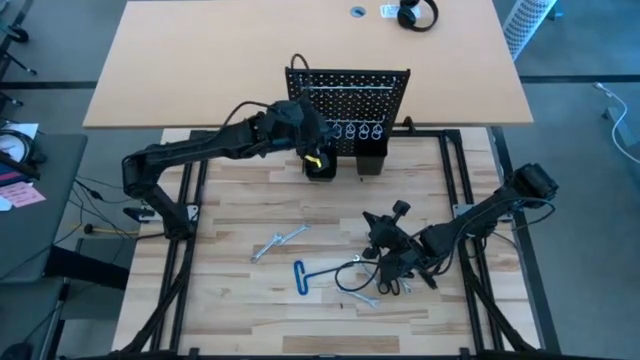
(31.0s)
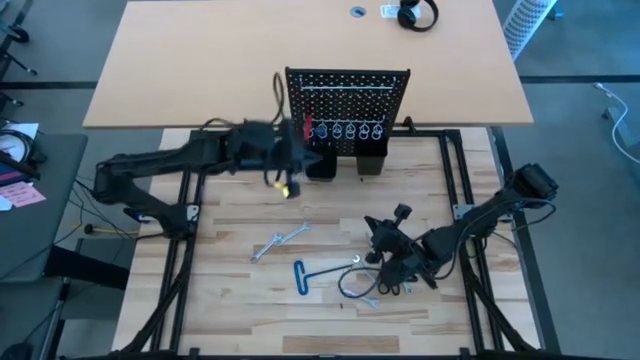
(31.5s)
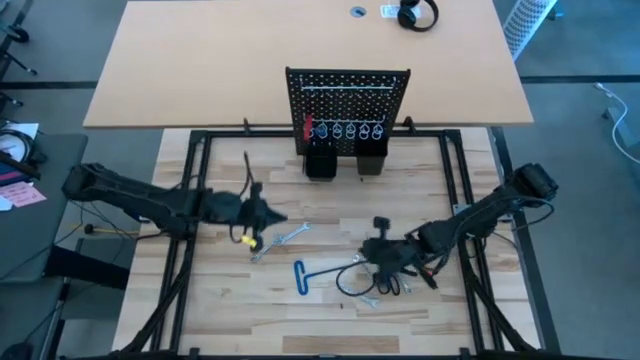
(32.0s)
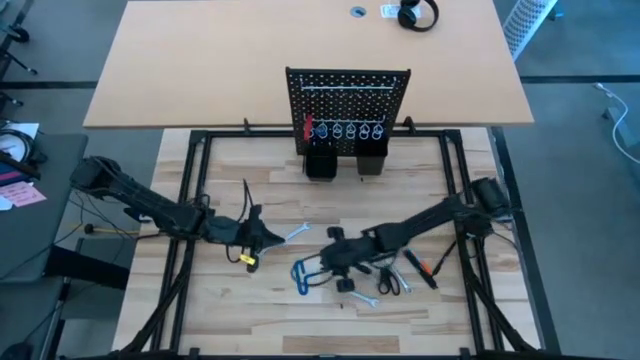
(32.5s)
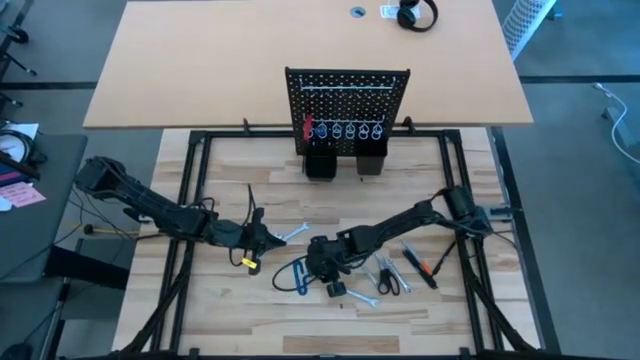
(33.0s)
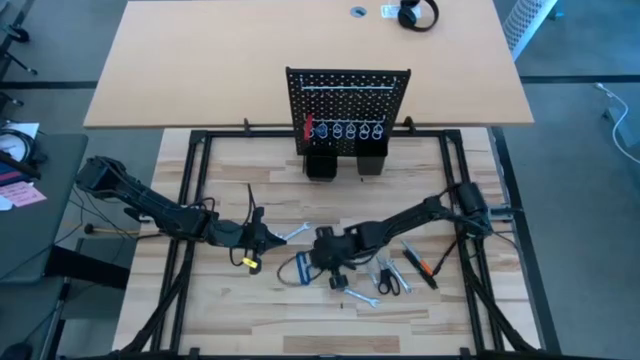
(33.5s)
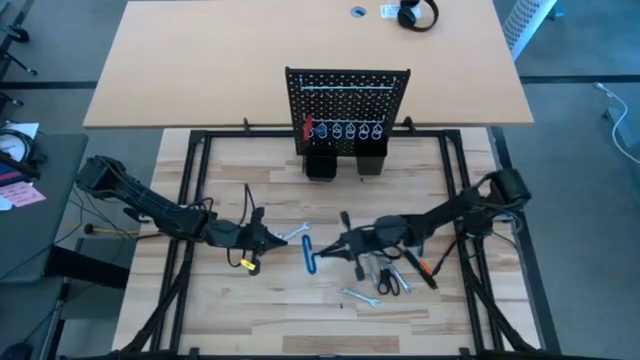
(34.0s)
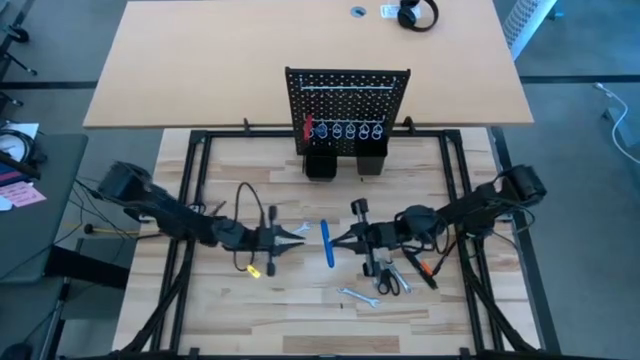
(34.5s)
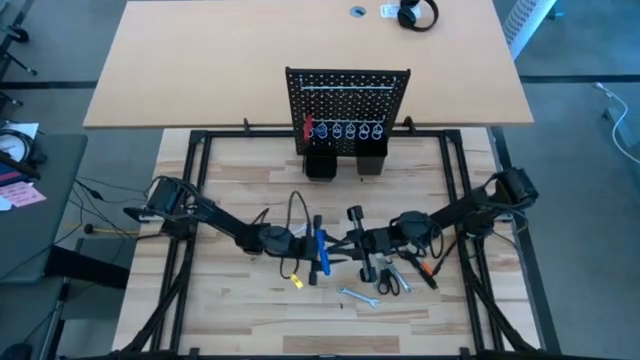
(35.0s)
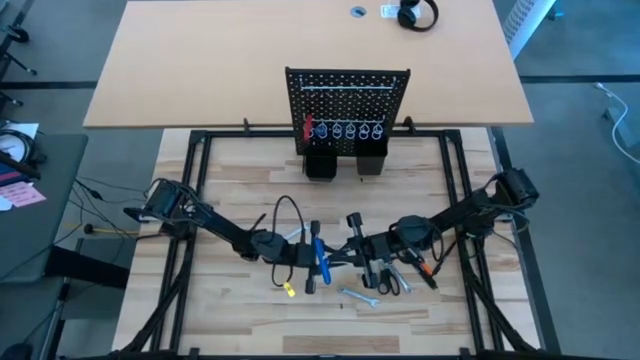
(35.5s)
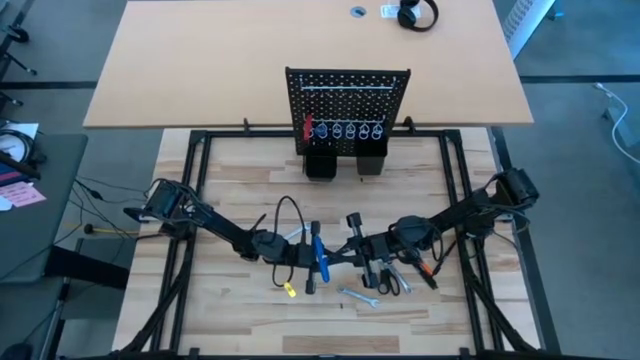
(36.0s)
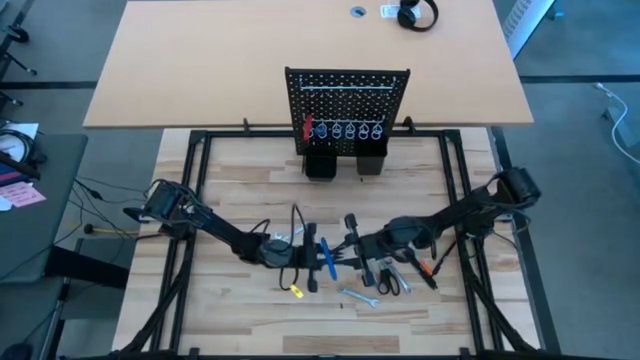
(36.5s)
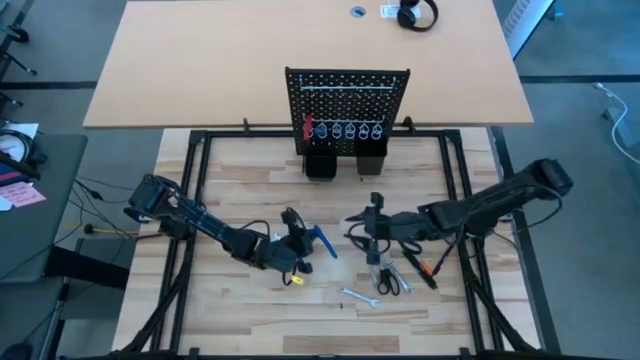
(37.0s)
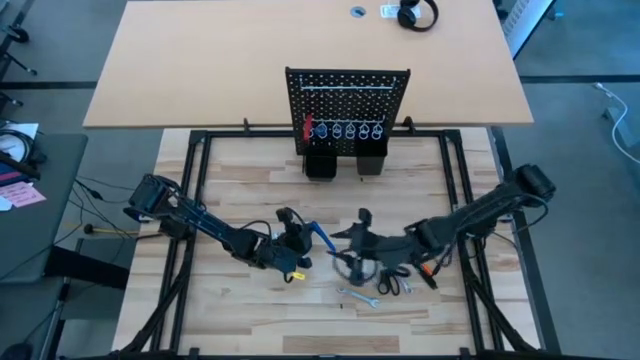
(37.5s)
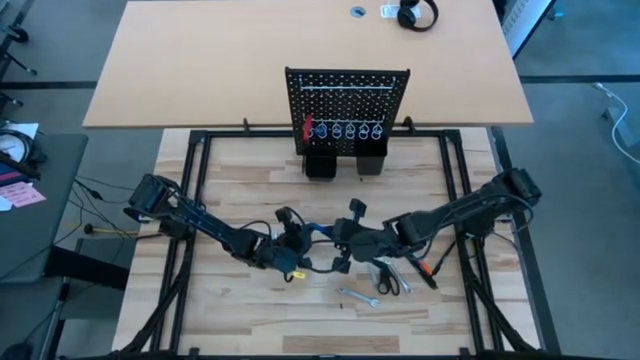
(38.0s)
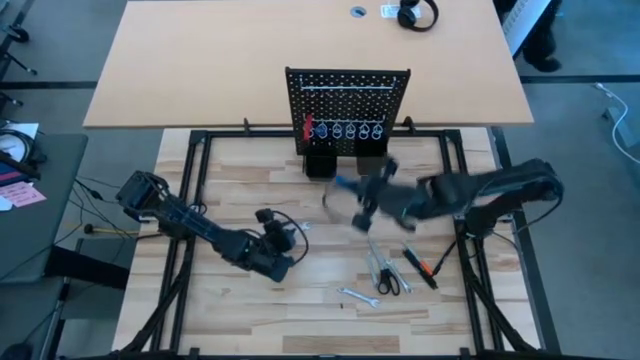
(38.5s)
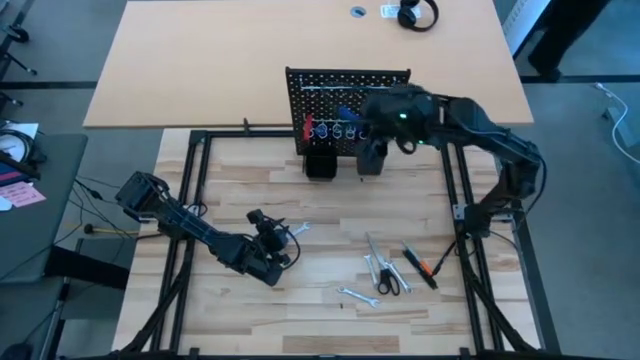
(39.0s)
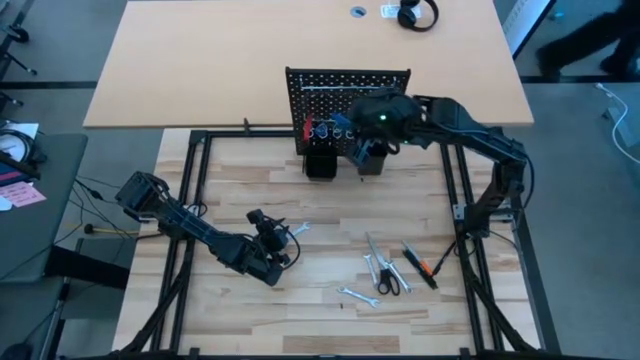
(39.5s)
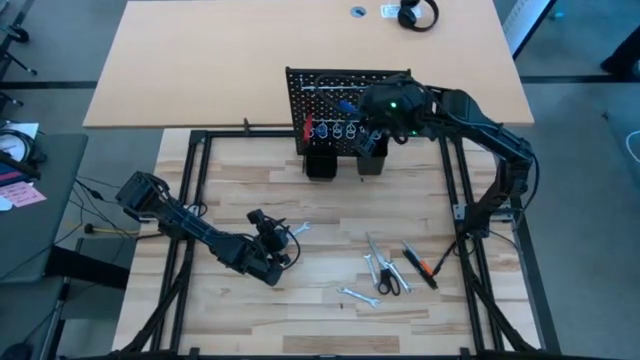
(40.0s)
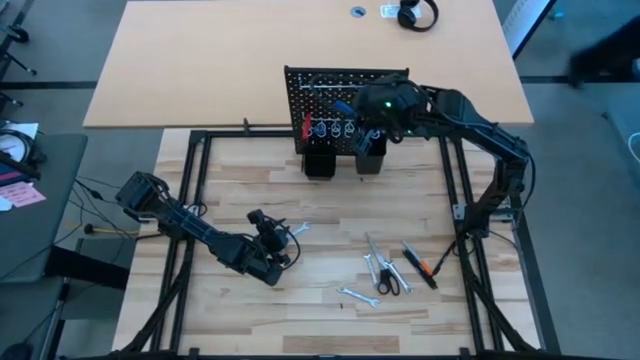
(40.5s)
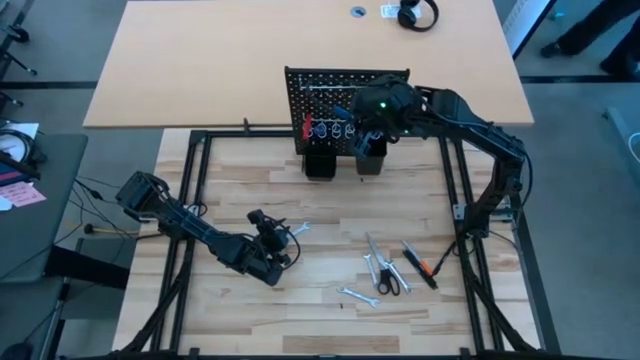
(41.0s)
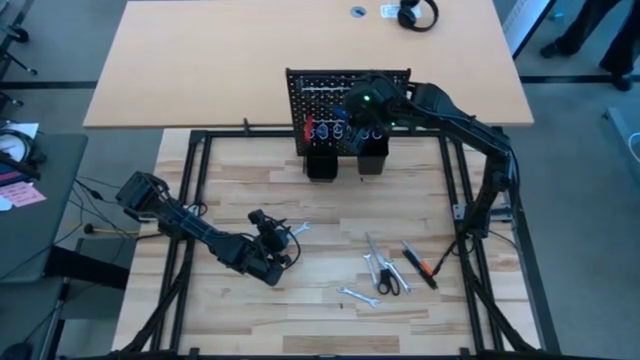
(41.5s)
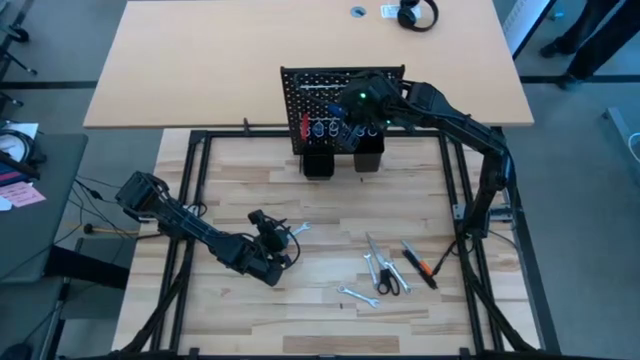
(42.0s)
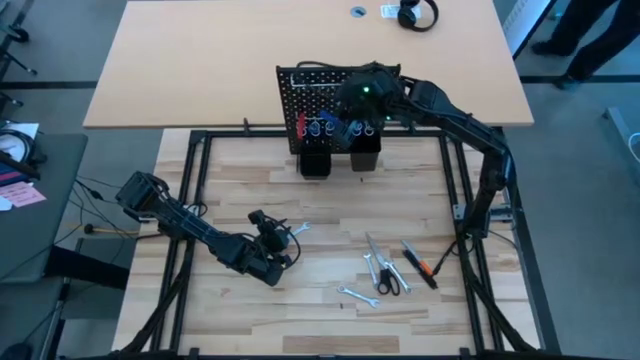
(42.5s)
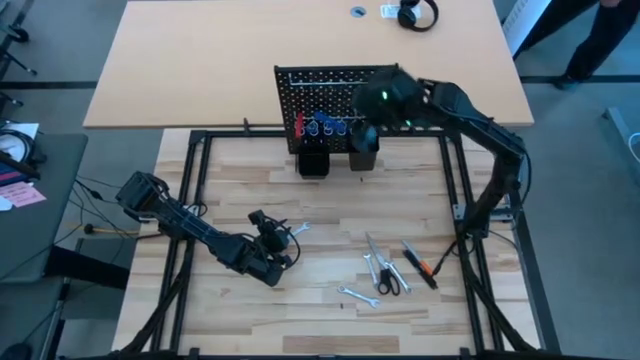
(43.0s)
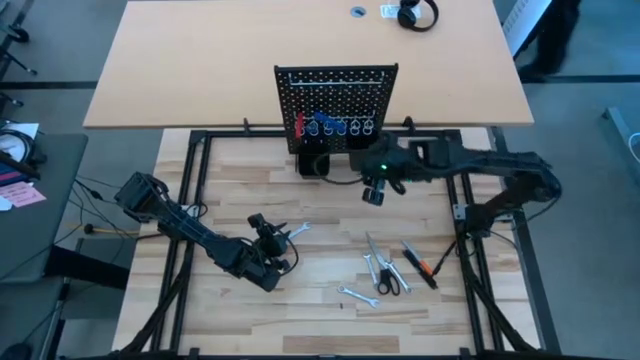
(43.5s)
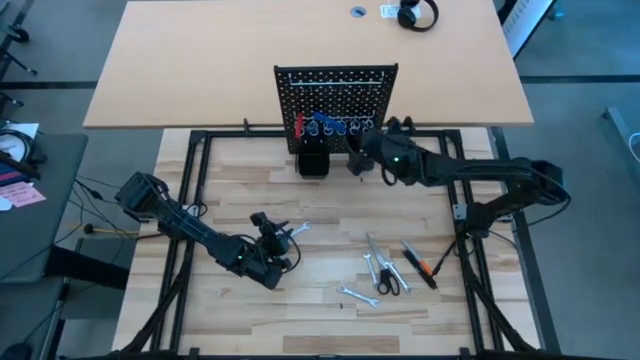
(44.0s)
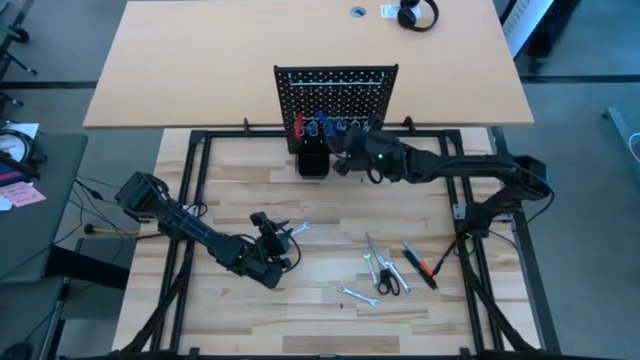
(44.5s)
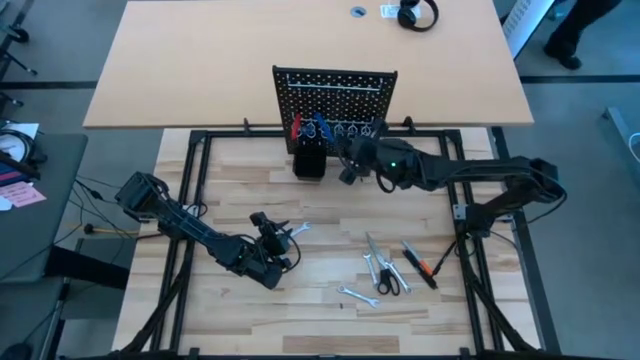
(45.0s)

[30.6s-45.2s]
Task: Hang tools onto peg board
Hang the blue hexagonal T handle wrench on the pegboard
